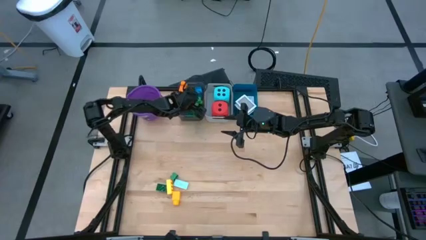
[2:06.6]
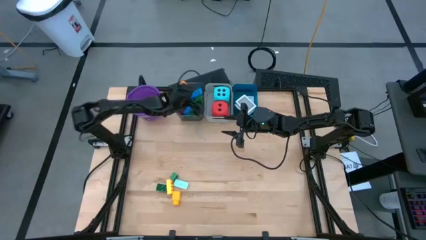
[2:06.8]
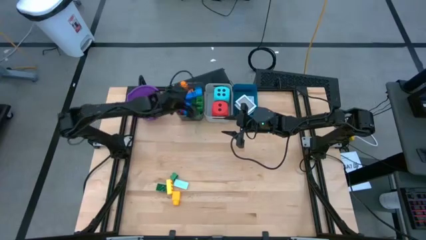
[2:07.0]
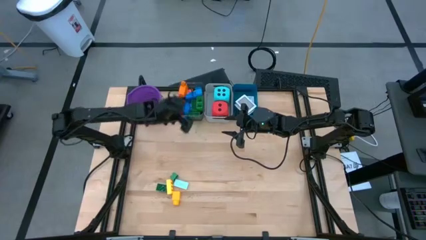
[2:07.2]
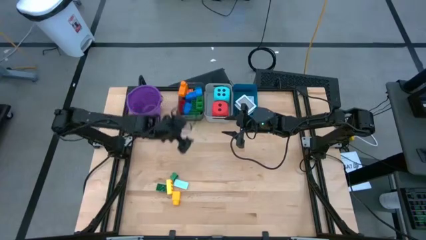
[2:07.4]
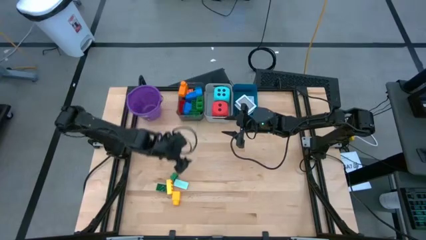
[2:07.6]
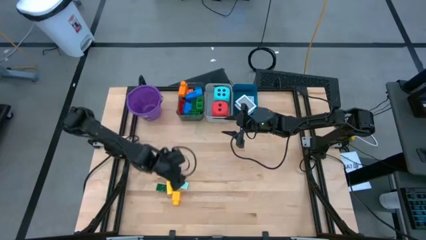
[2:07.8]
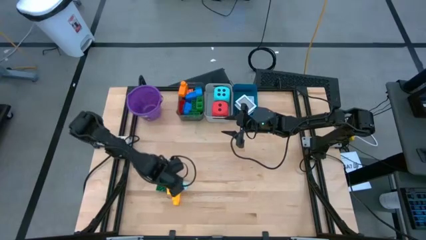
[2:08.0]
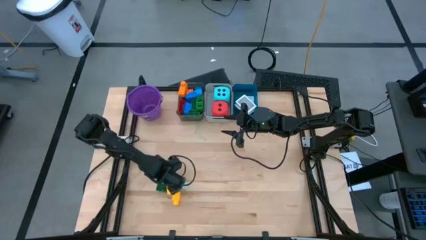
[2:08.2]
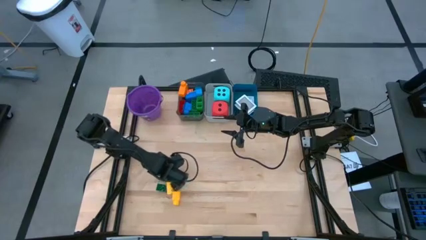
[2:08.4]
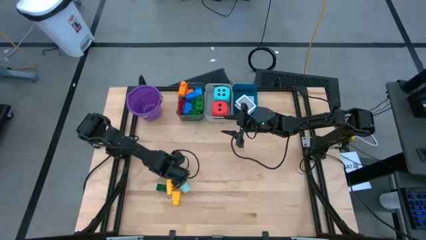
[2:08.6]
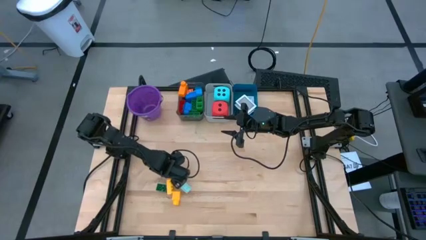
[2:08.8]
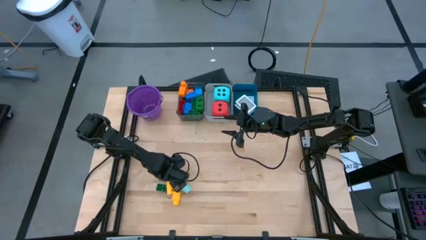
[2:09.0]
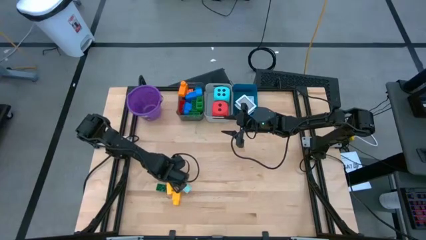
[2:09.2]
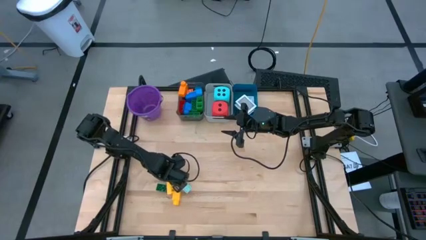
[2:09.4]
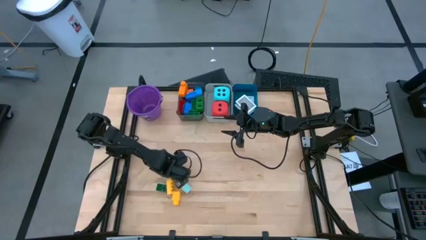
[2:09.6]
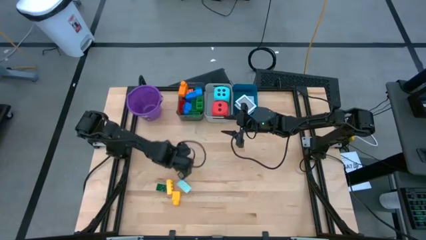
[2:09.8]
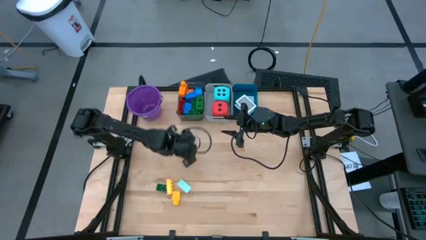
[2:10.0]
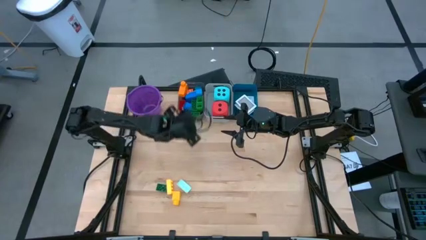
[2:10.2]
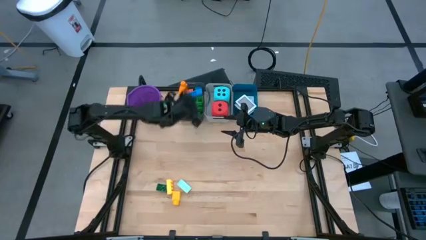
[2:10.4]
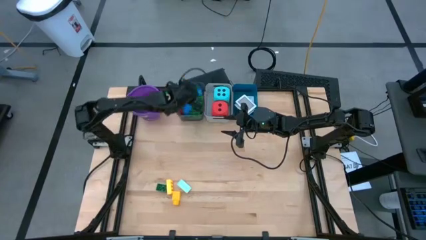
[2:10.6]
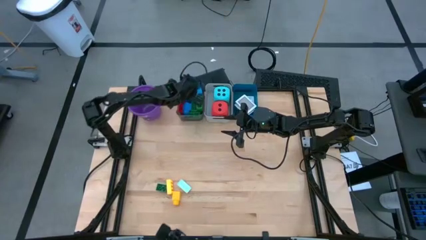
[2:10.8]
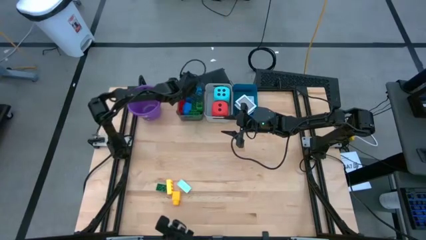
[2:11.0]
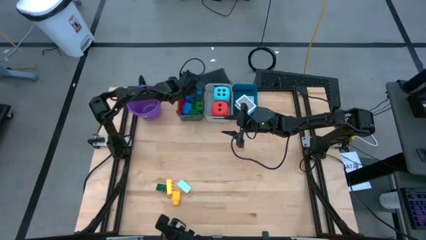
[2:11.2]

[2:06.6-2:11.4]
Task: Pick & Place Toys
Put the green game piece into the black bin

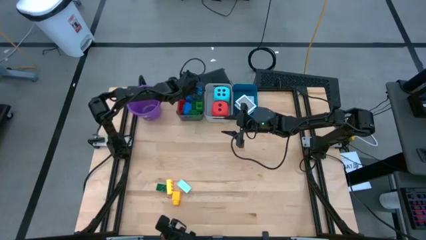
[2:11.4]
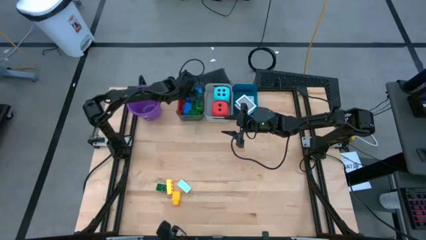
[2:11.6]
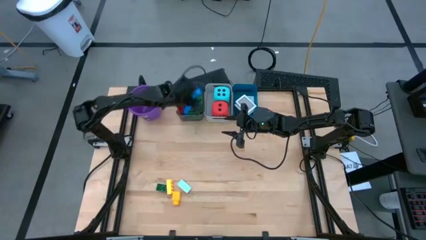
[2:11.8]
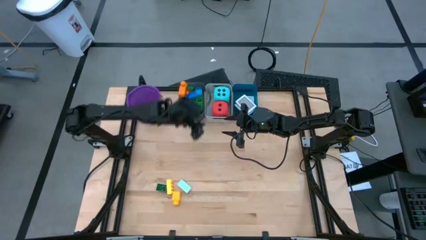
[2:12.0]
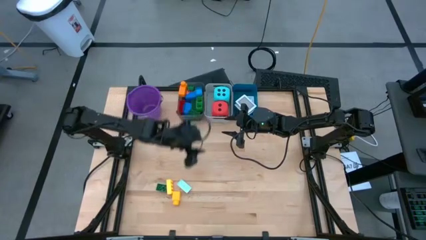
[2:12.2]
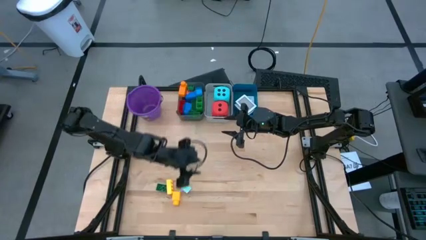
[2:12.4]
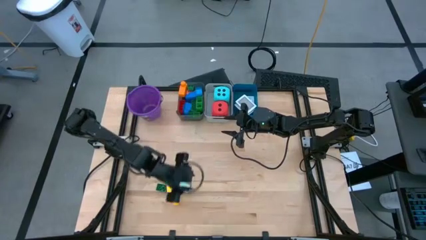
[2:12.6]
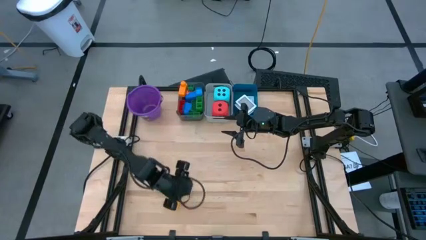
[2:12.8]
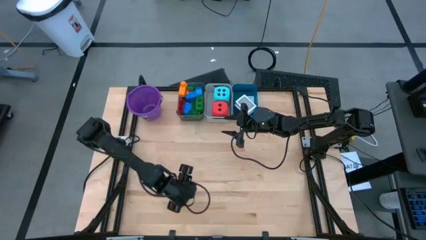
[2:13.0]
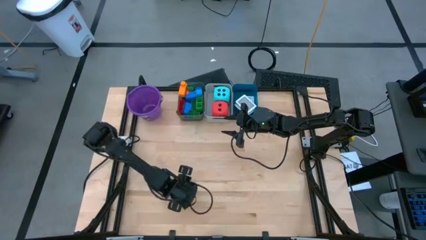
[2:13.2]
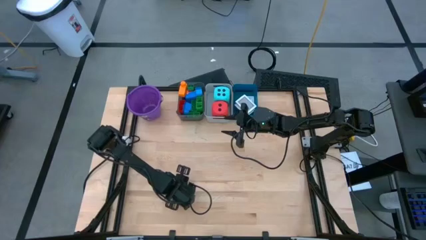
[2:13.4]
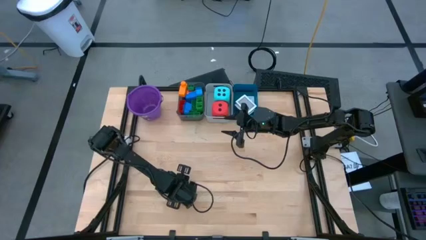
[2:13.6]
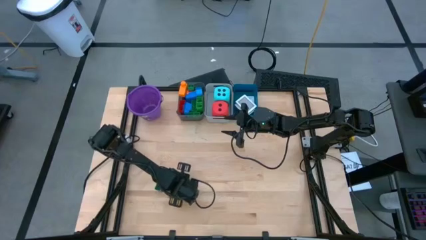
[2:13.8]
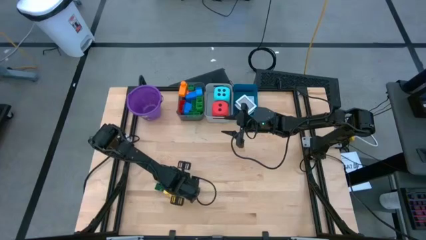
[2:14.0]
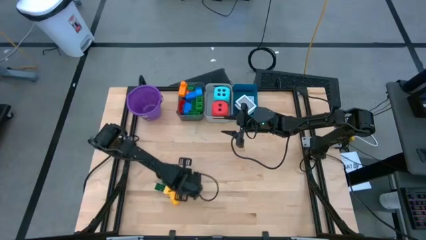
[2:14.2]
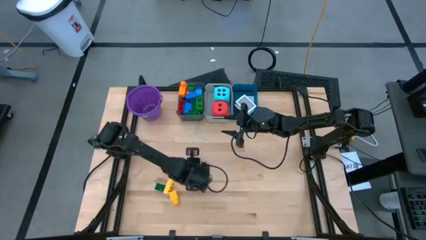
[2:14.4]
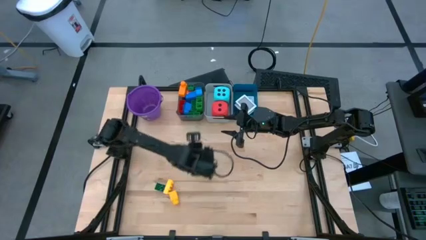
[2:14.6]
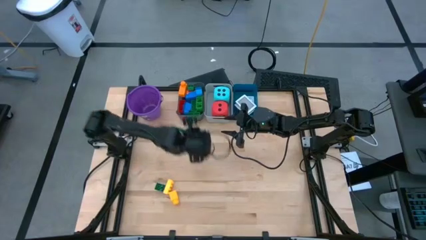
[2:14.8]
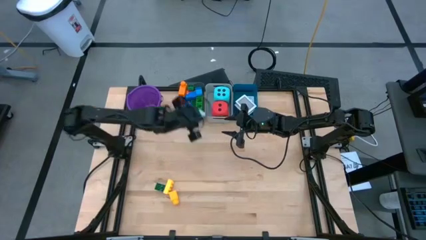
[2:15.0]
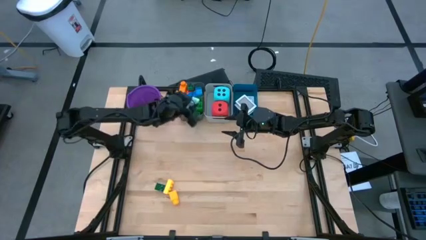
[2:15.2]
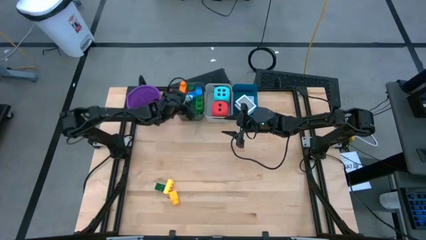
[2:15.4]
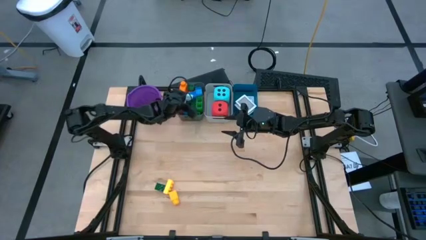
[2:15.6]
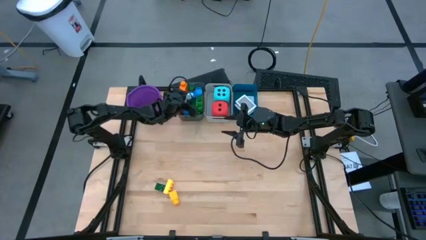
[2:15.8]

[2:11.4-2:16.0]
Put the light blue game piece into the black bin

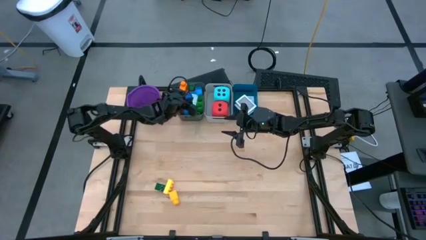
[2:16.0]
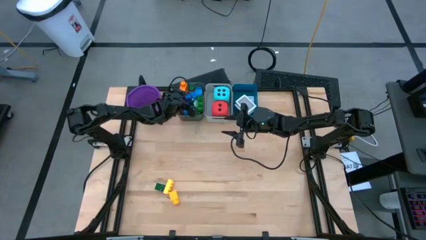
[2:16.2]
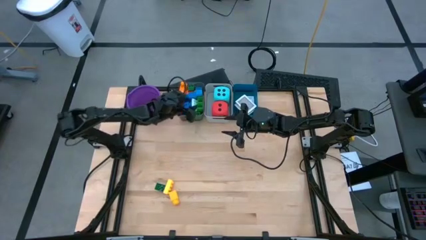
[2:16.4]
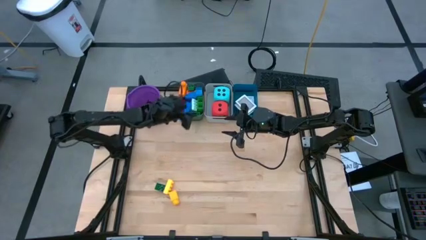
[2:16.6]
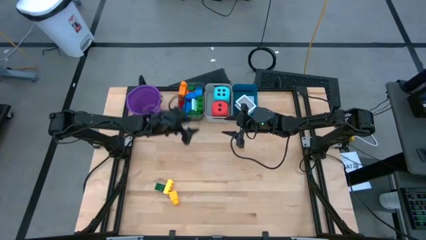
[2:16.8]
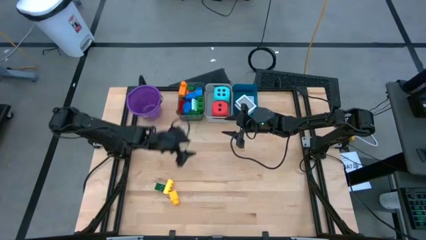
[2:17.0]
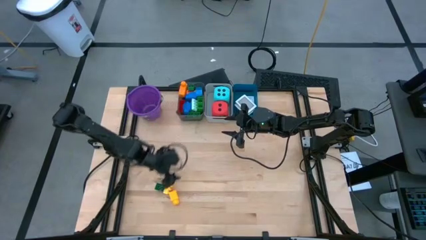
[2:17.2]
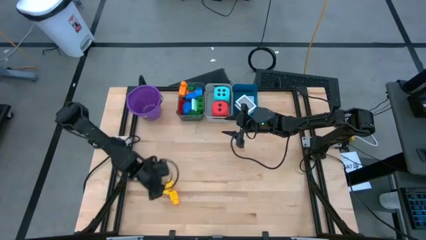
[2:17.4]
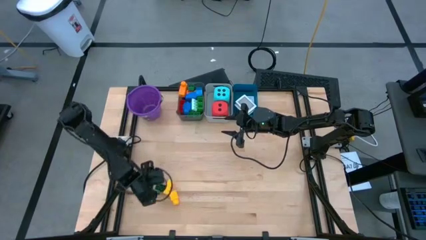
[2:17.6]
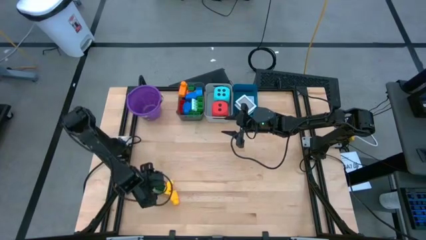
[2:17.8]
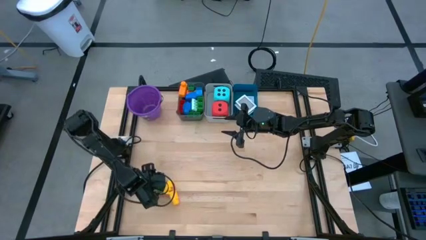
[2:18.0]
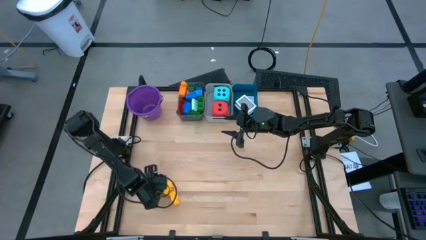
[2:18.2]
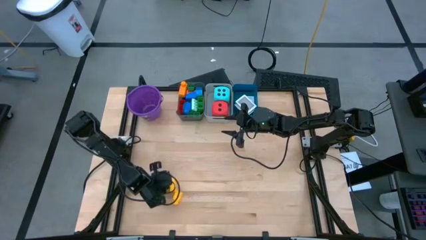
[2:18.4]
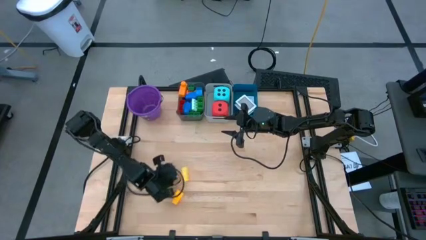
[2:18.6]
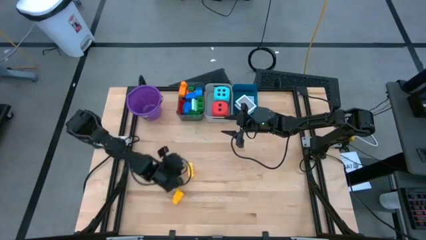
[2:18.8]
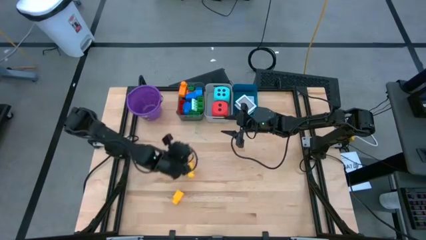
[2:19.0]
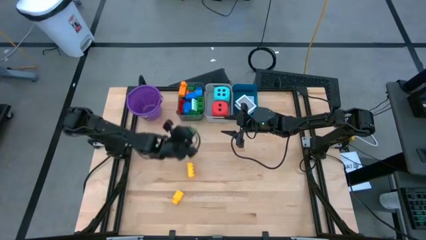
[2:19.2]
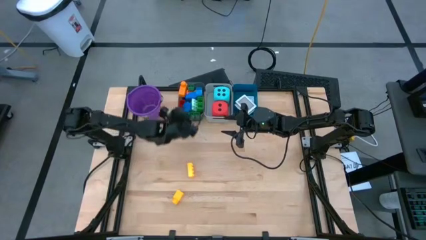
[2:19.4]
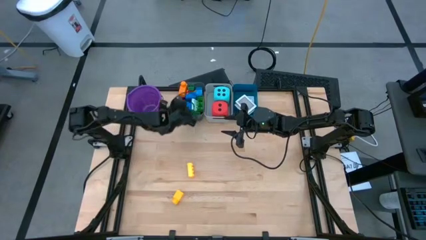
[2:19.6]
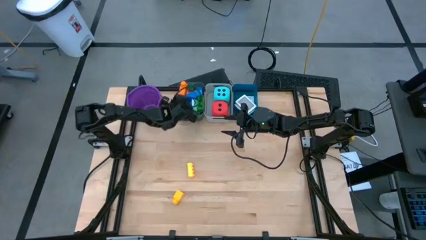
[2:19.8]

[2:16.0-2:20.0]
Put the green game piece into the black bin

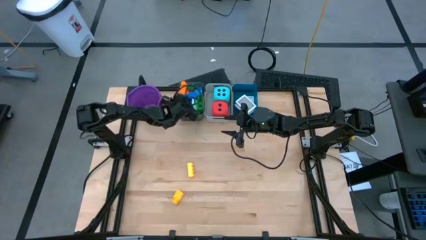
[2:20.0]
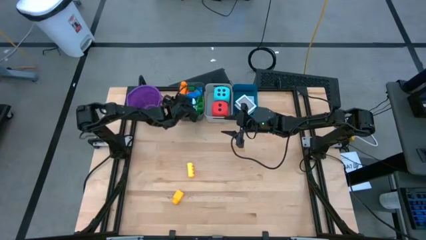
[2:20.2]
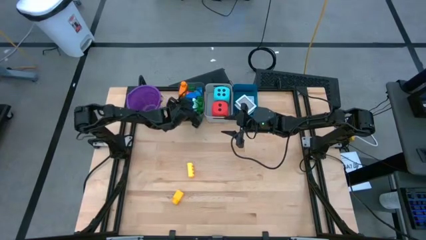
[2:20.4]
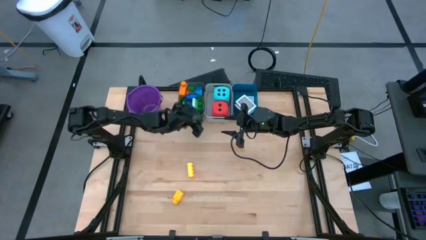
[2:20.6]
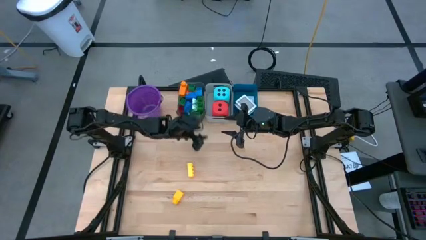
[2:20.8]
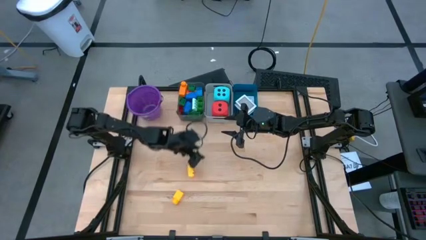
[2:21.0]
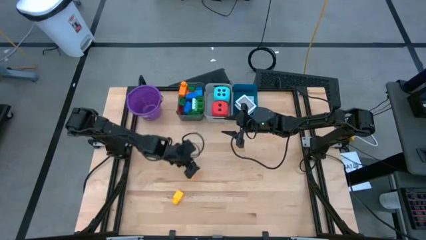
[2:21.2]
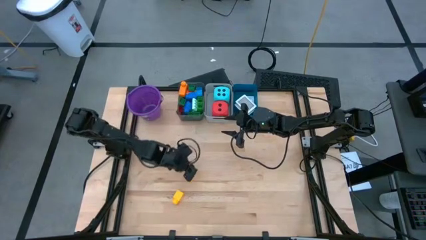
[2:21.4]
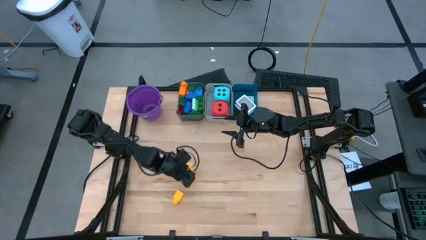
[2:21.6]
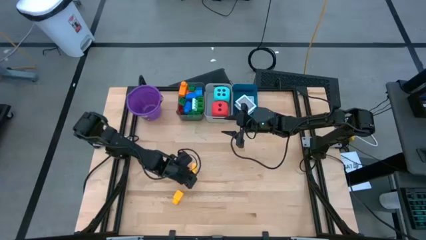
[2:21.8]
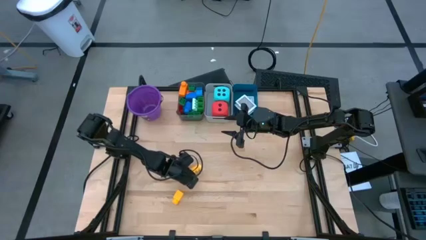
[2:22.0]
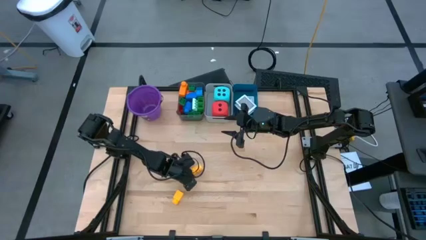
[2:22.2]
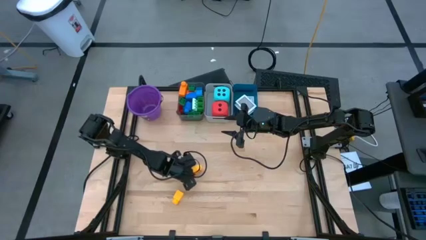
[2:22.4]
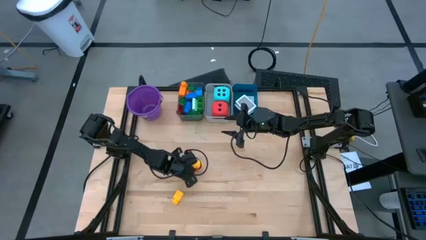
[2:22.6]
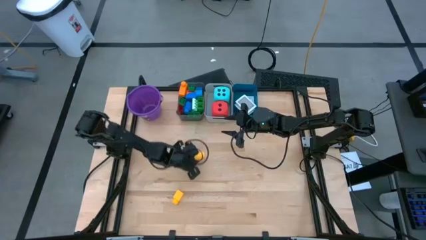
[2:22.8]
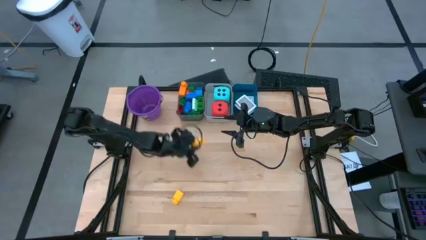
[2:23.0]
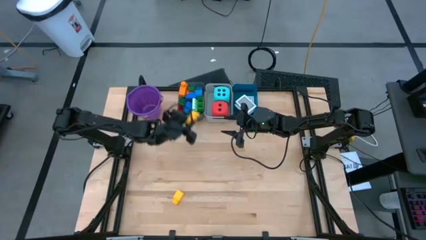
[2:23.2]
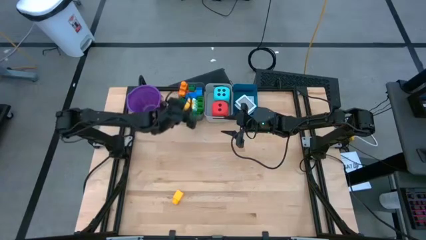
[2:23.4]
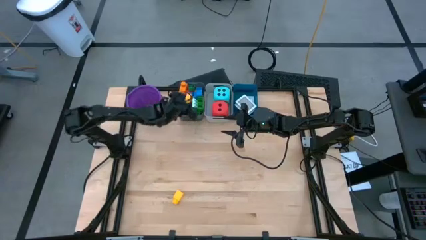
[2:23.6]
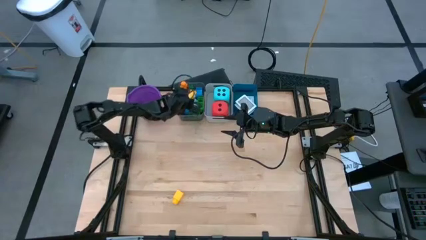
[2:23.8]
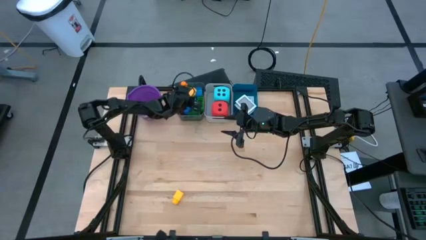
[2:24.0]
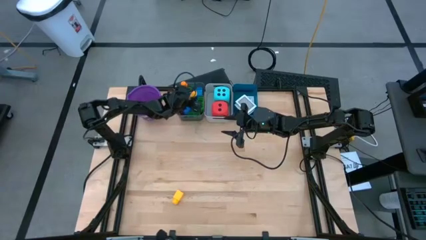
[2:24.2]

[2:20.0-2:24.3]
Put the yellow game piece into the black bin
